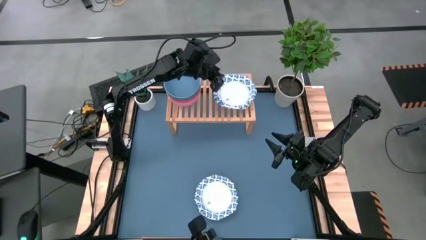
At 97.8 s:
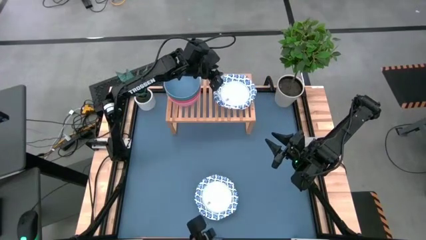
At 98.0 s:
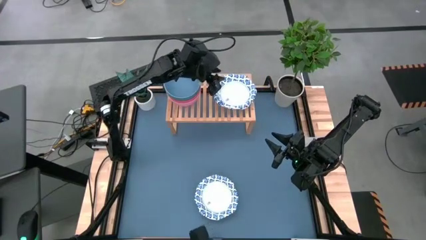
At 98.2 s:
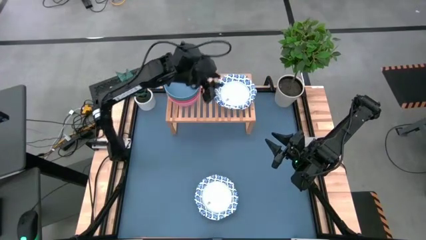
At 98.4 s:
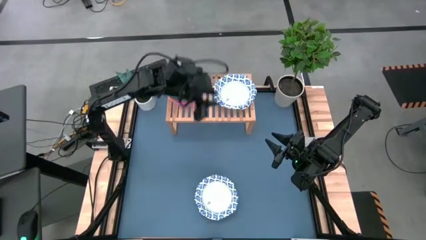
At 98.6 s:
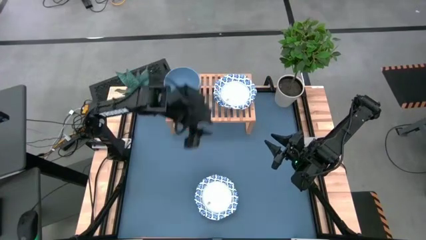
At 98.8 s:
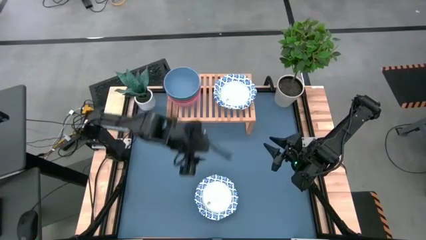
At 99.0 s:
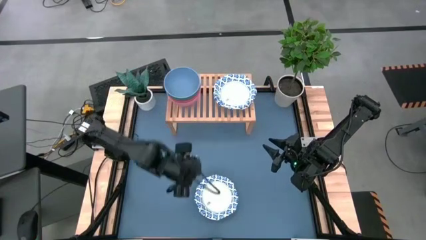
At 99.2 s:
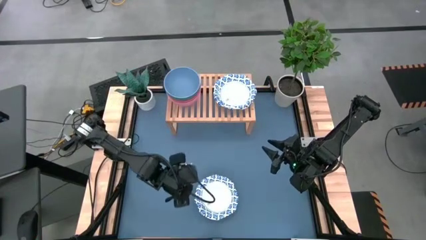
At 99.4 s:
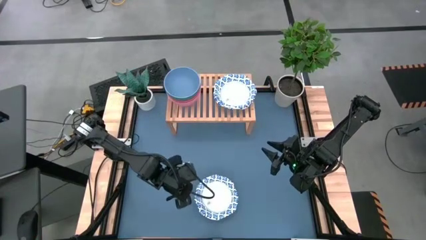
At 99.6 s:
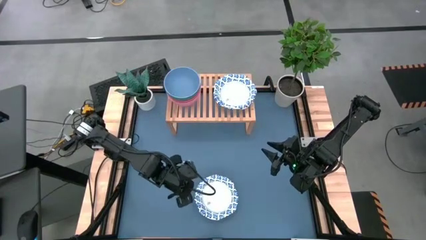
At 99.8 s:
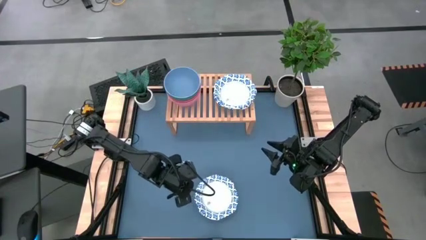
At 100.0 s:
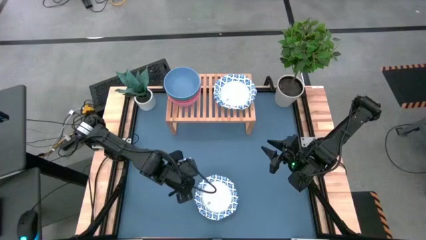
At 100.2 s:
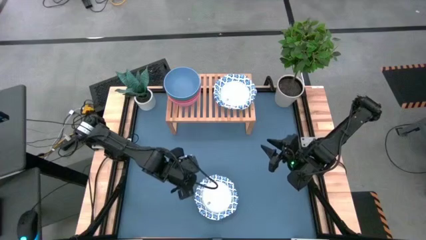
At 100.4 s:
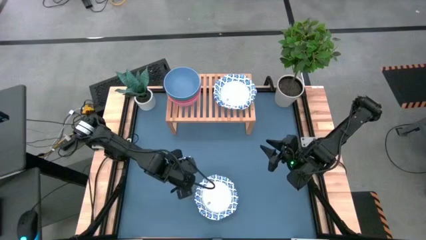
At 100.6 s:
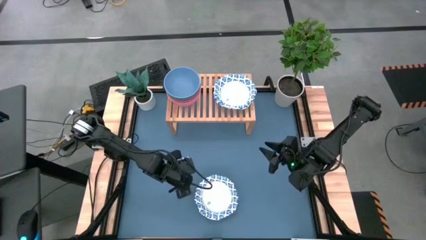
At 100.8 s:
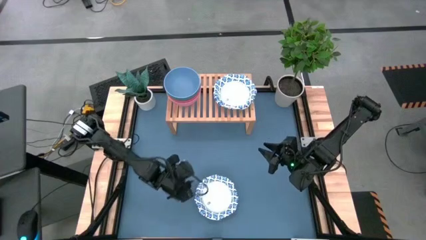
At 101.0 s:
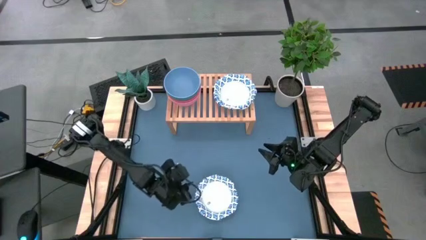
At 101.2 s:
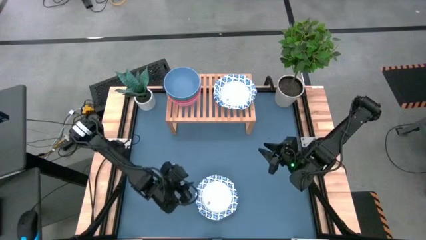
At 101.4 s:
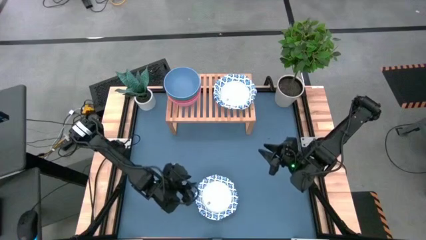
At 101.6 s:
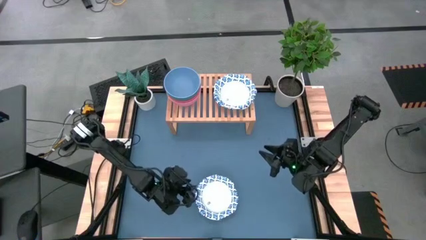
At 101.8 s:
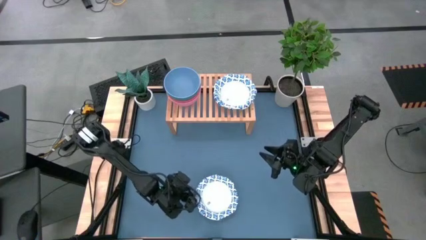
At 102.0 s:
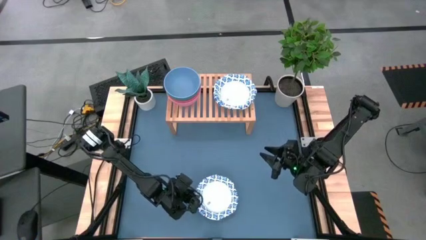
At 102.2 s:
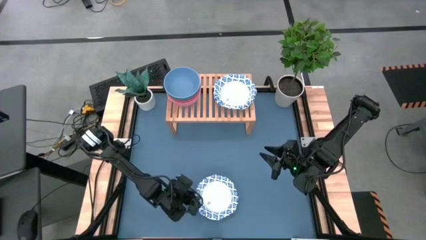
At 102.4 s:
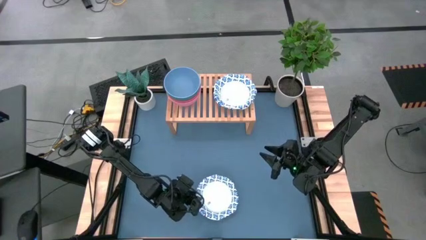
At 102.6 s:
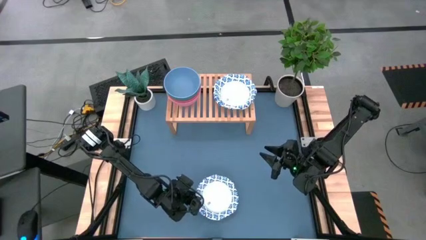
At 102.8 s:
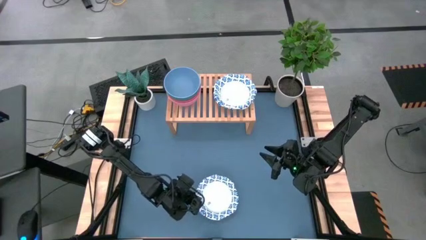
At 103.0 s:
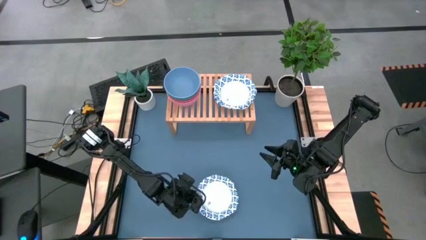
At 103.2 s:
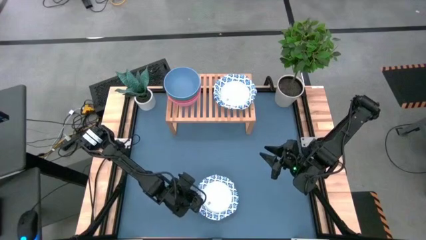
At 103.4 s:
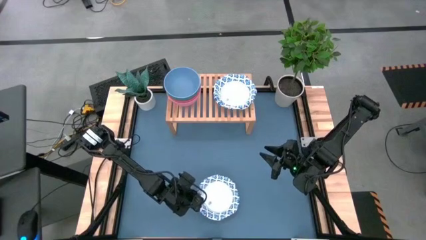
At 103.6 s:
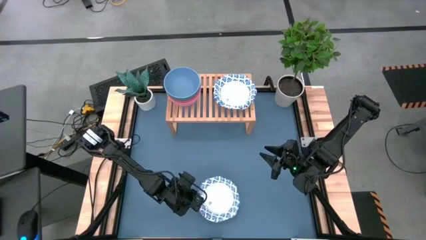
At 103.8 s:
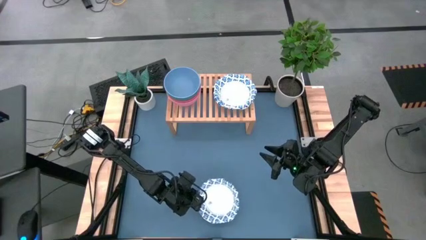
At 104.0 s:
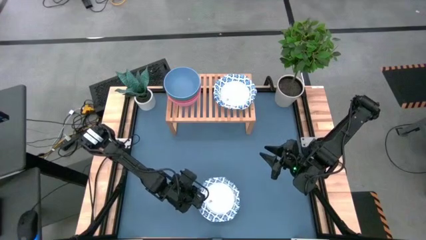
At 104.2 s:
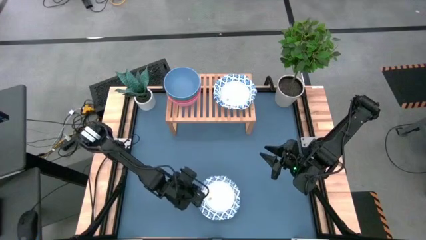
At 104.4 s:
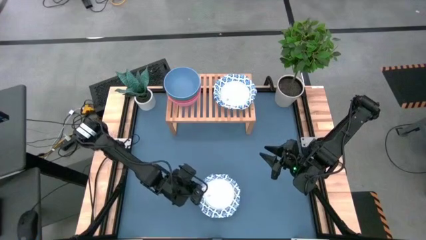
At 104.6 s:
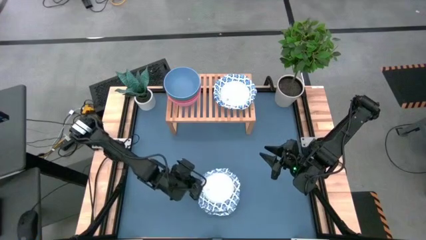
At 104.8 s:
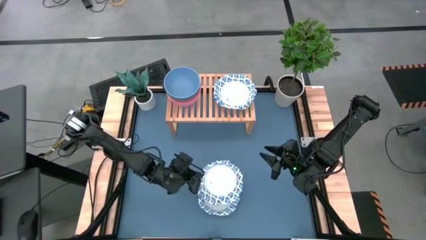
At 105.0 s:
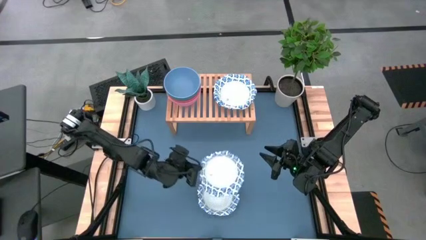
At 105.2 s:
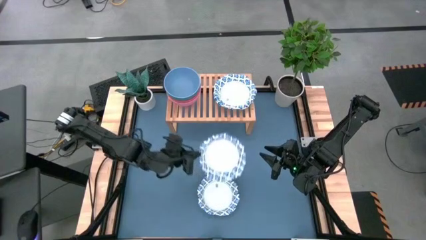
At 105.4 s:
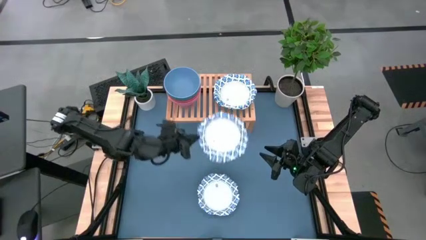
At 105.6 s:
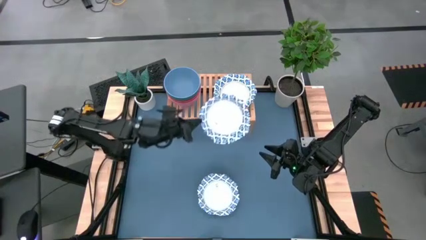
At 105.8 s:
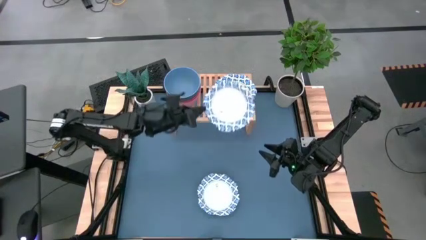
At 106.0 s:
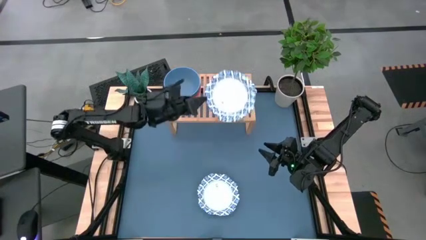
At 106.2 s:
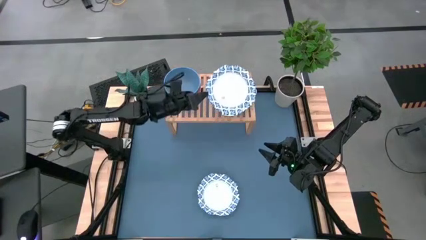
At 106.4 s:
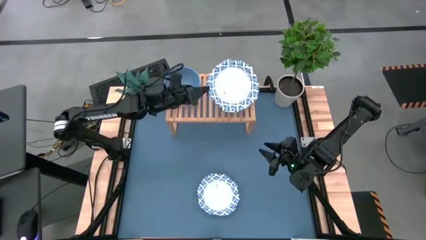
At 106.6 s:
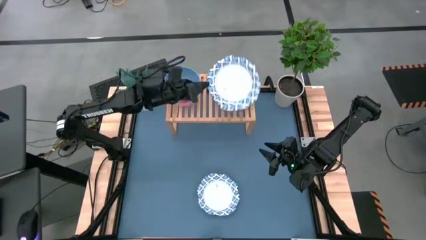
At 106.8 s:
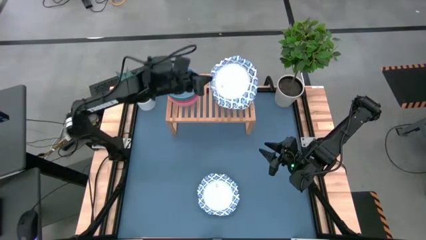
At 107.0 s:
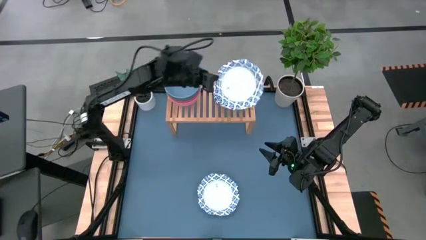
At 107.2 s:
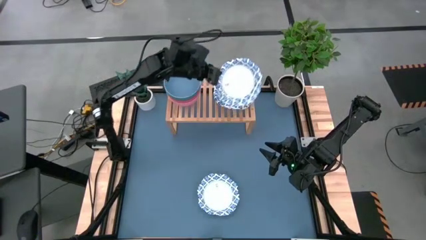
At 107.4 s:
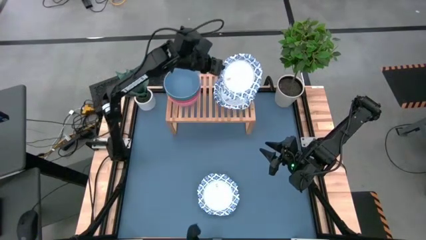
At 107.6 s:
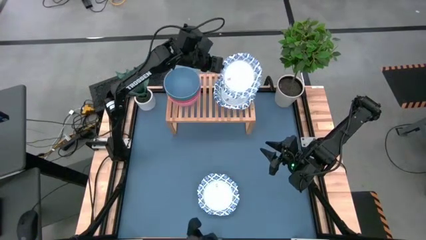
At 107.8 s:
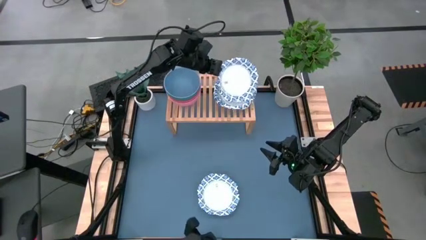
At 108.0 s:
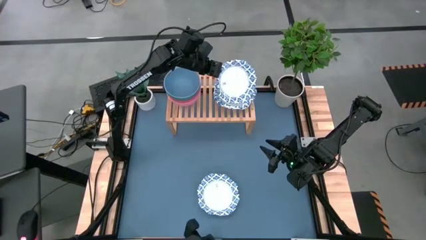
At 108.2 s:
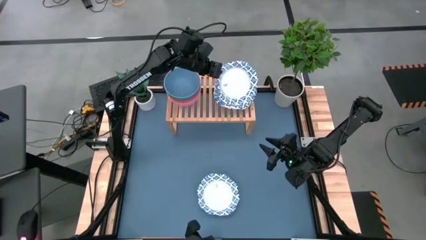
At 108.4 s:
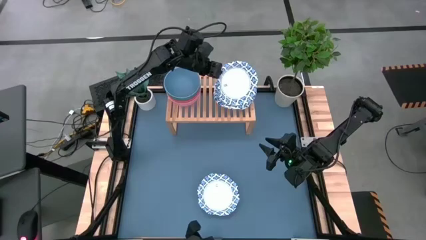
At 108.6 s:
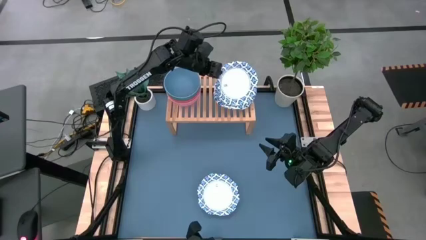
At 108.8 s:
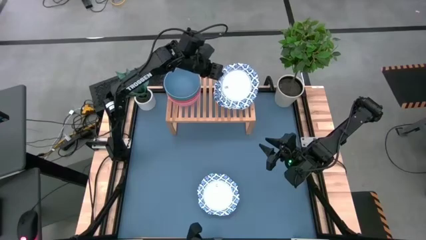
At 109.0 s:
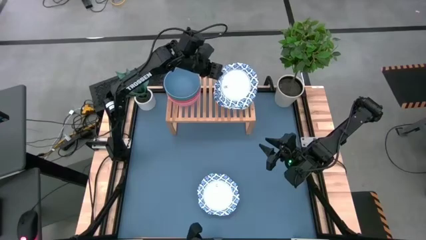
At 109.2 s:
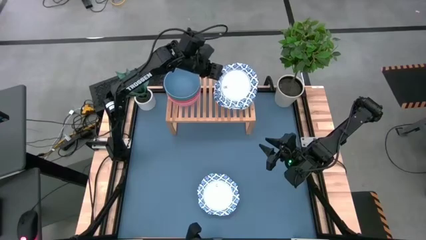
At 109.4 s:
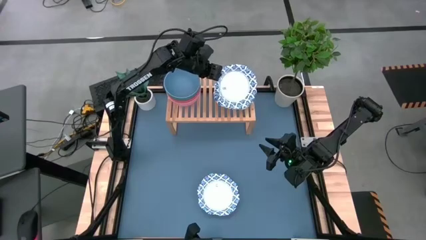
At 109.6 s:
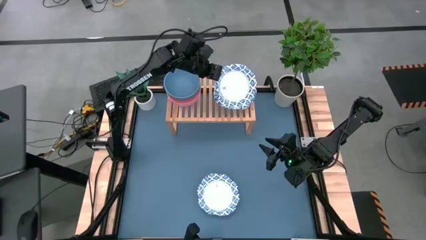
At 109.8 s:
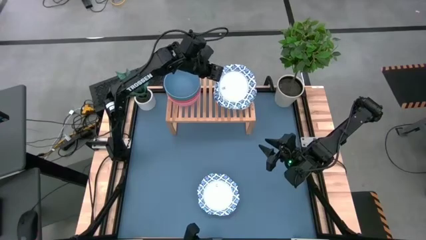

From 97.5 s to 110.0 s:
Task: Place and stack bowls onto a shelf
Stack the white patterned bowl on top of the other white patterned bowls on the shelf
